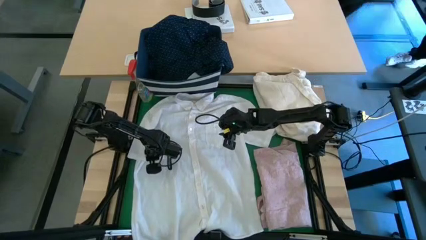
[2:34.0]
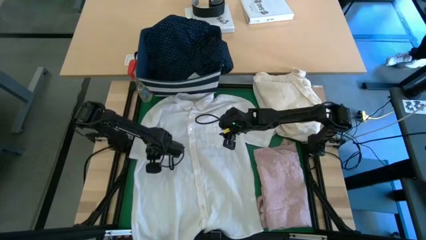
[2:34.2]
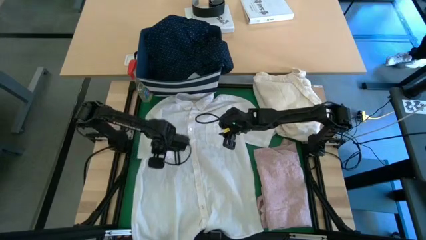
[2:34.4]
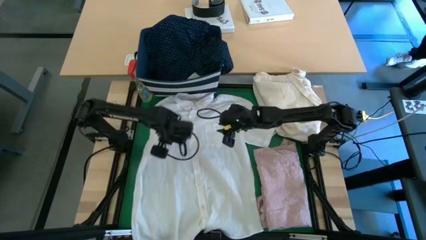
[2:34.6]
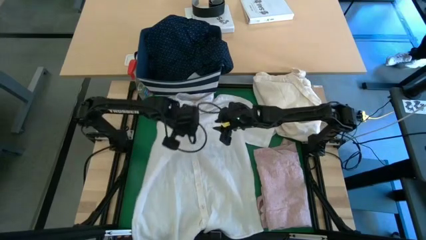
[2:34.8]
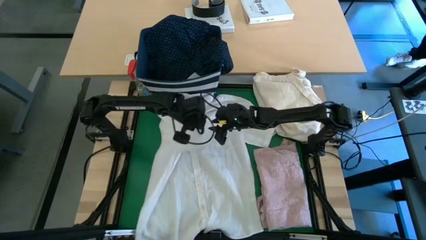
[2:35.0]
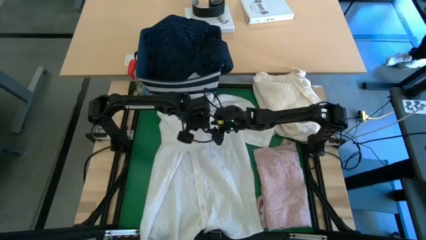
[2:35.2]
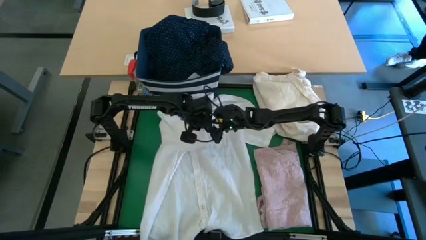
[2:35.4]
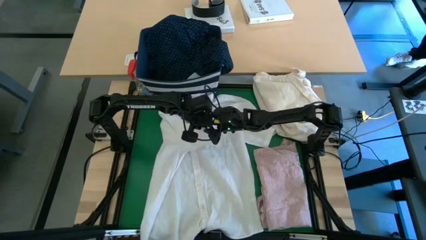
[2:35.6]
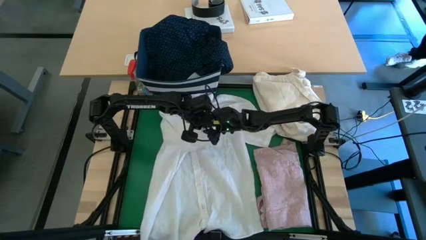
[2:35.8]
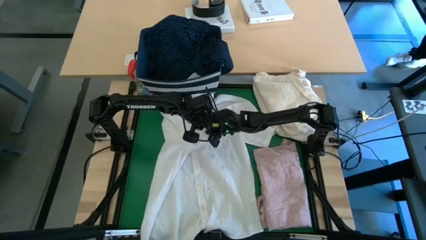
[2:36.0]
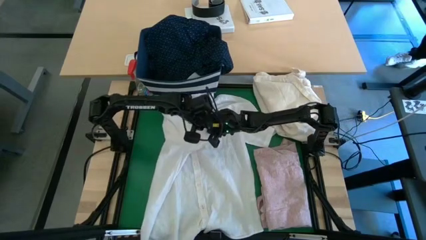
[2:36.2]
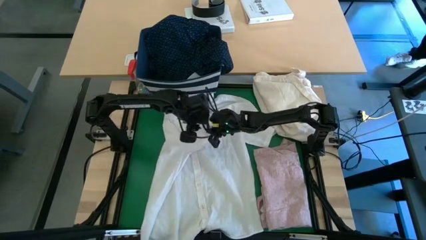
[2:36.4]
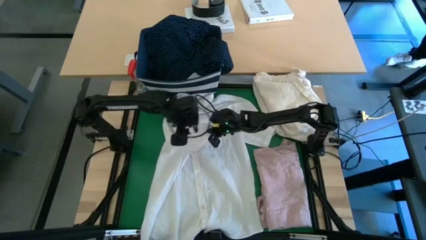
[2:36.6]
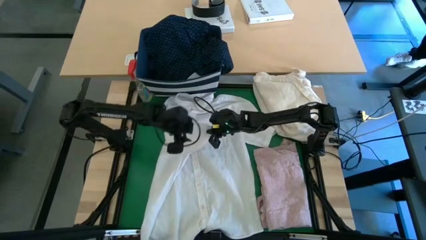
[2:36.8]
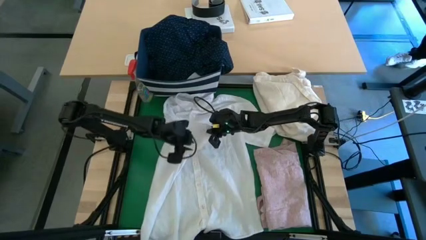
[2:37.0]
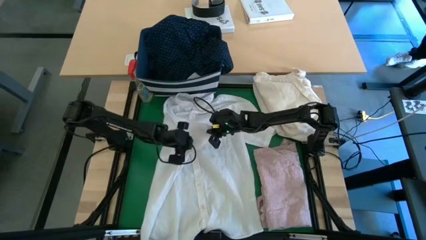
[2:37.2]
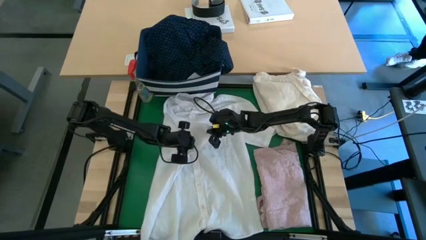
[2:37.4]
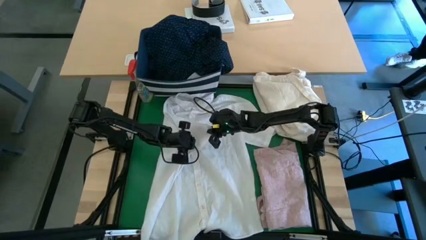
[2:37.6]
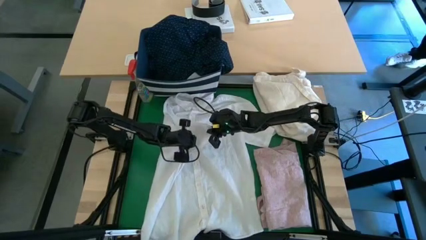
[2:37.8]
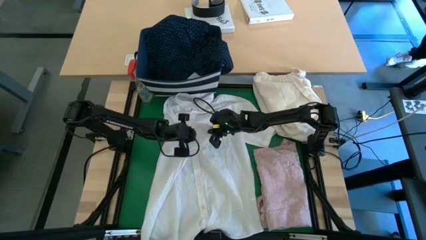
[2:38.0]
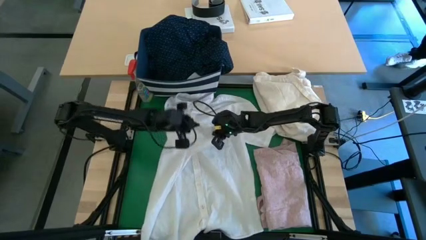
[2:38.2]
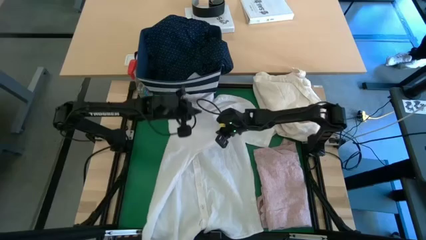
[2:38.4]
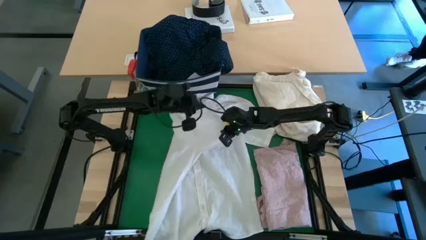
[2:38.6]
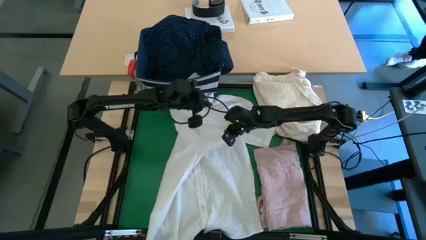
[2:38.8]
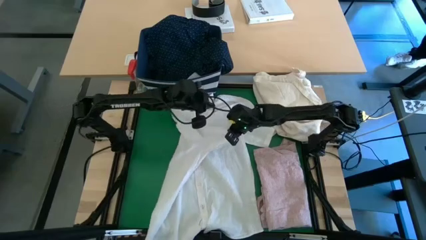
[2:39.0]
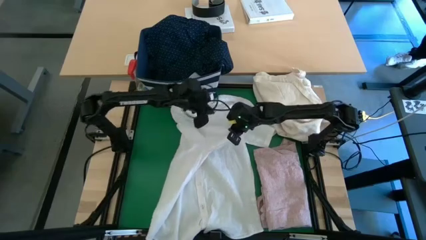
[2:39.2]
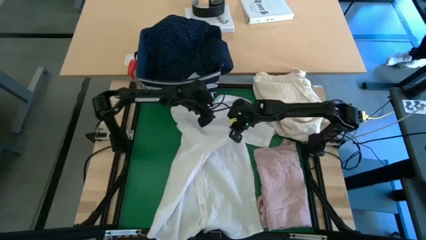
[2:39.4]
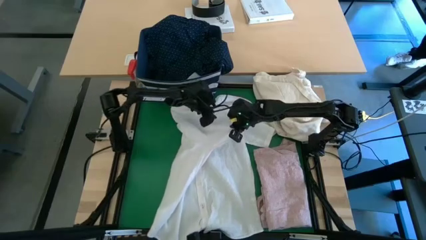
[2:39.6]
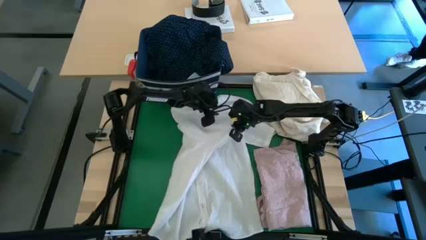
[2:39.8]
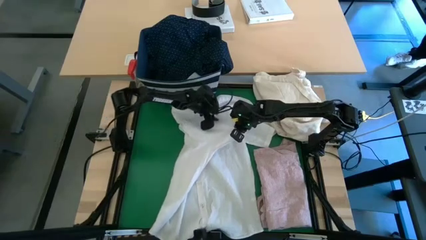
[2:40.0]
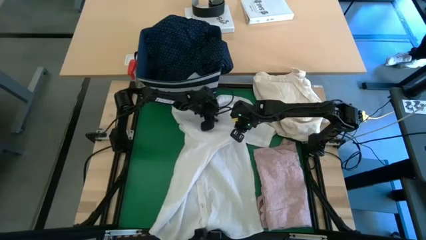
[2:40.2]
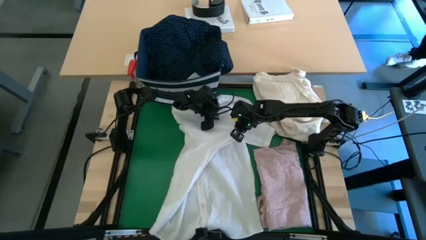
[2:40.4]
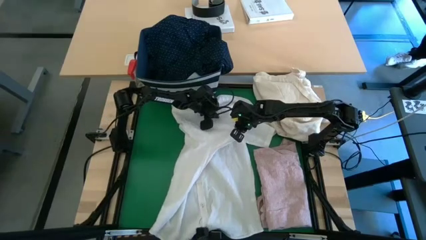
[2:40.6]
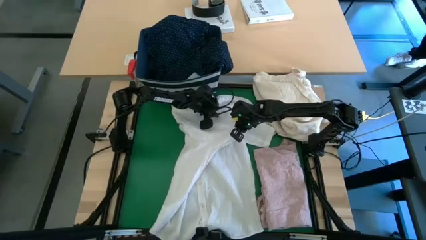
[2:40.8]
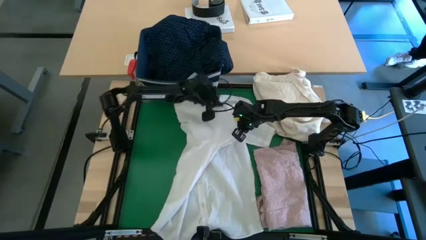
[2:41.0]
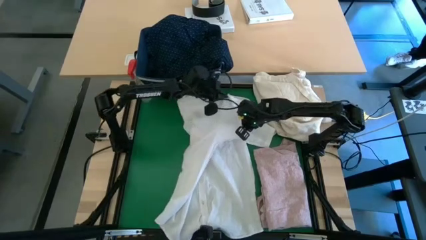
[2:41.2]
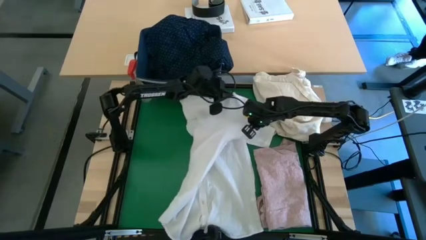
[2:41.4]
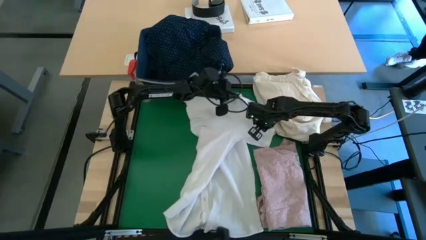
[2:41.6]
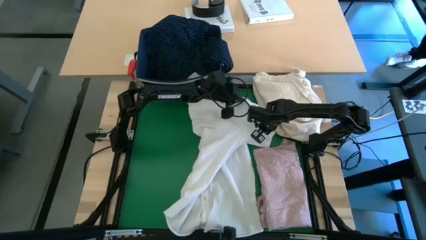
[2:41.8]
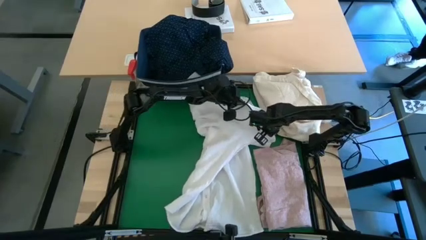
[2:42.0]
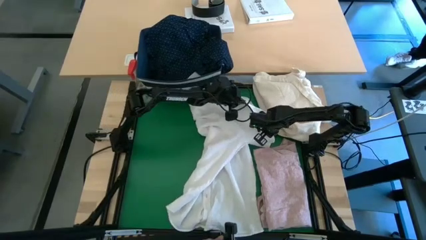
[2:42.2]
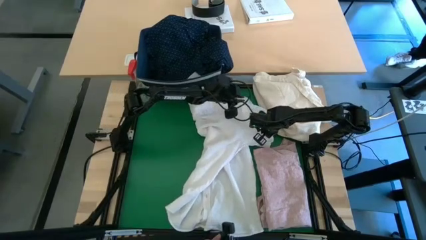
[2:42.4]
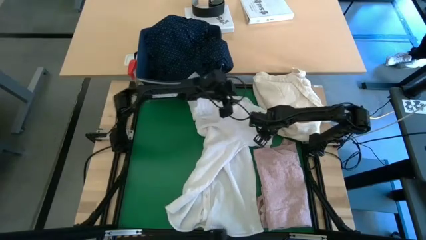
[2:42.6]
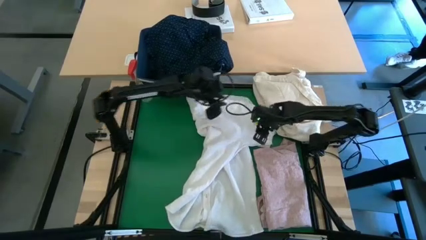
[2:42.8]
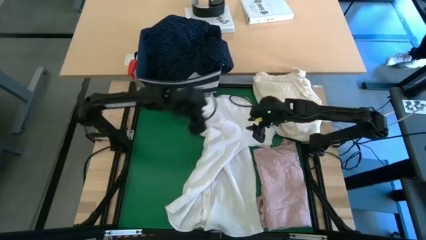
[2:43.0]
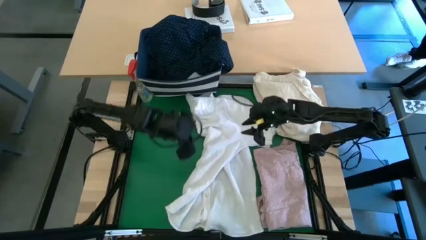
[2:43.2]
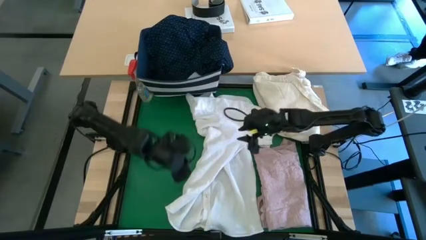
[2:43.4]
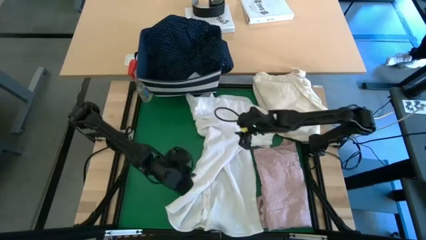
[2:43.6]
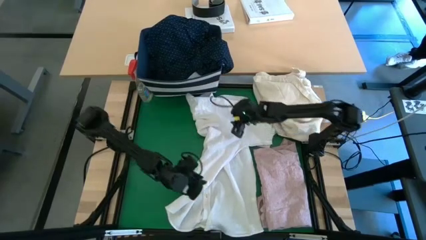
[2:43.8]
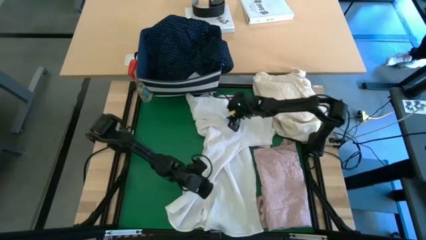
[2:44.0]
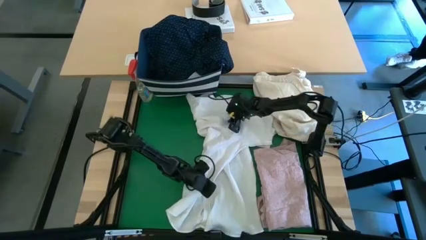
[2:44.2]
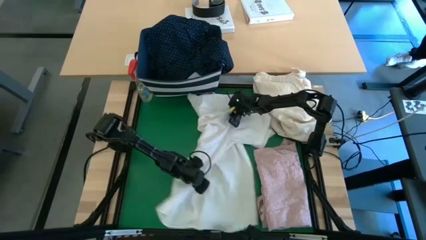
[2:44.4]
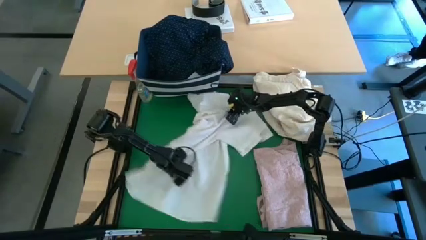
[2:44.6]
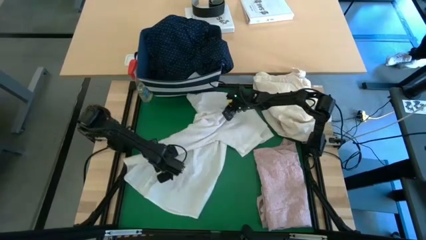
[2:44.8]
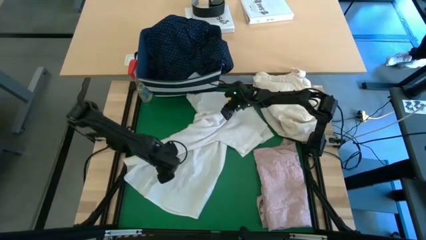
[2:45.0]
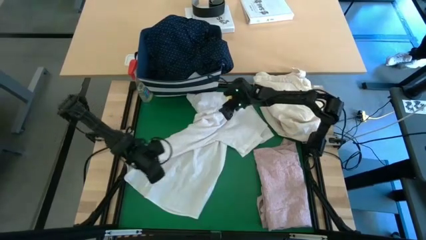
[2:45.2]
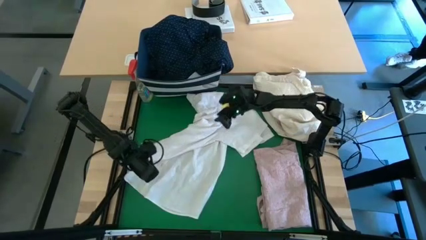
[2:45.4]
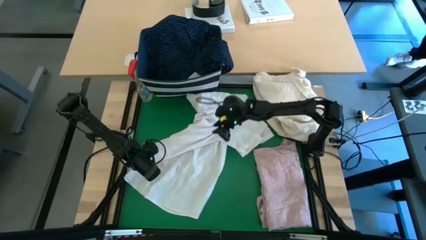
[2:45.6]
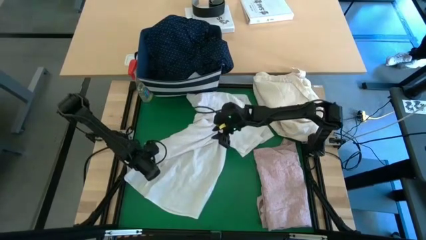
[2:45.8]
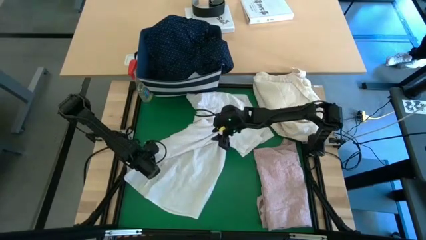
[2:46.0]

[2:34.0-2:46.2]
Task: Fold laundry
Fold the white polo shirt

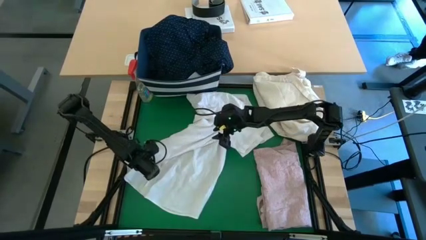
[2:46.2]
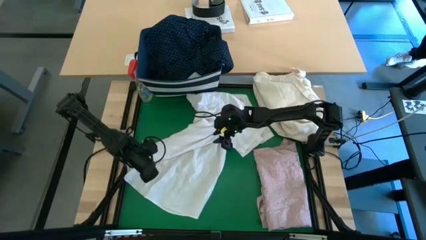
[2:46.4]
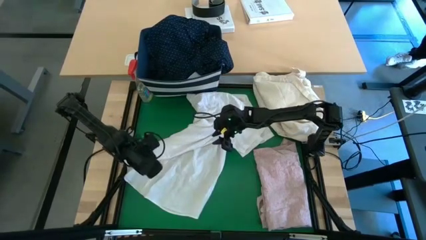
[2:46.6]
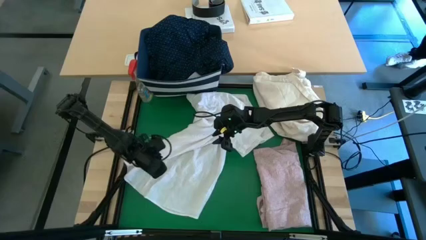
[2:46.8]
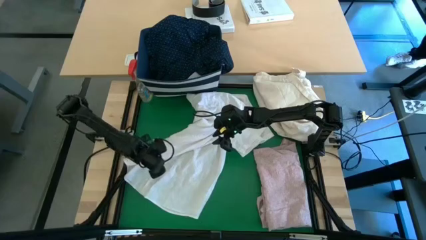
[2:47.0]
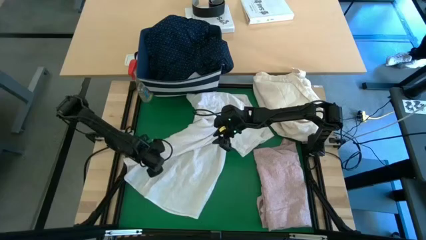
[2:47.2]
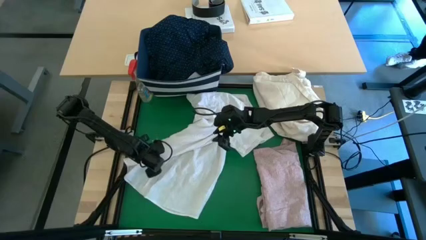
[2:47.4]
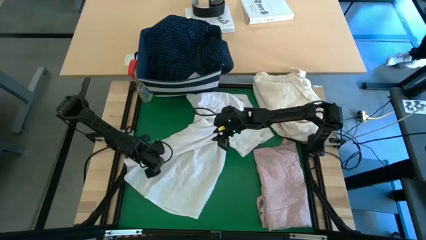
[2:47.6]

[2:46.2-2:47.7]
Fold the white polo shirt

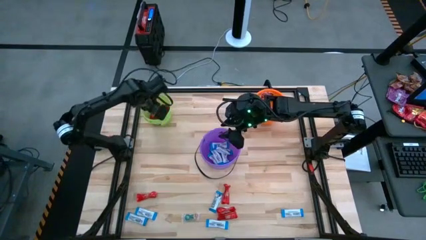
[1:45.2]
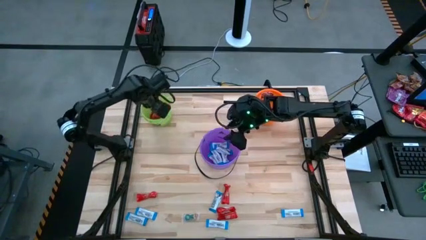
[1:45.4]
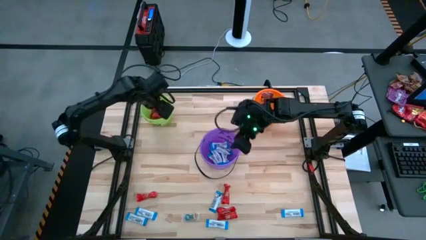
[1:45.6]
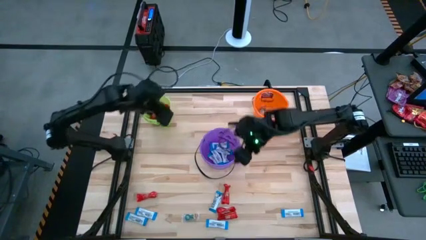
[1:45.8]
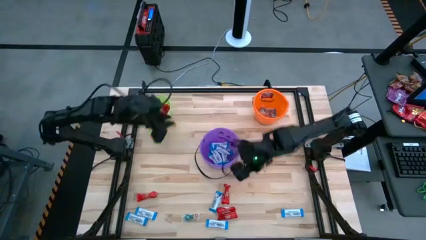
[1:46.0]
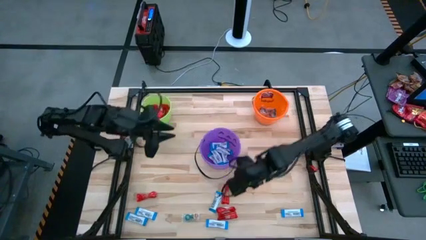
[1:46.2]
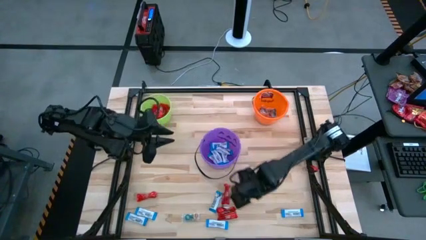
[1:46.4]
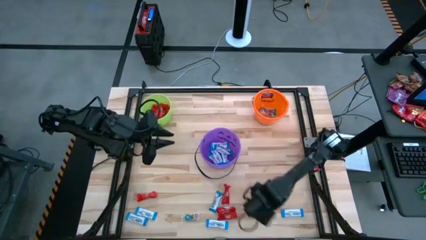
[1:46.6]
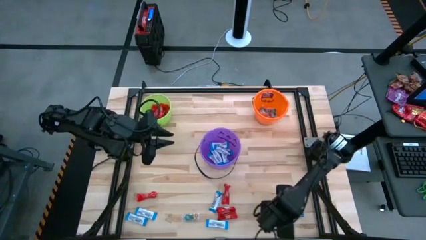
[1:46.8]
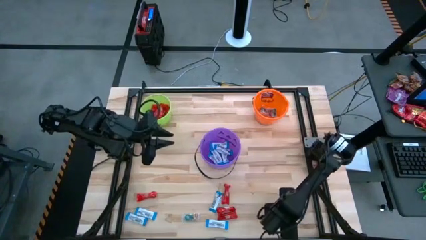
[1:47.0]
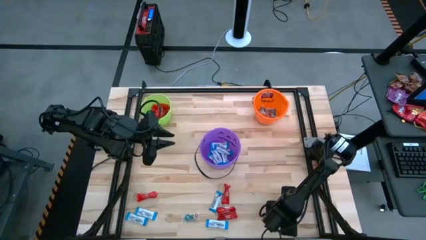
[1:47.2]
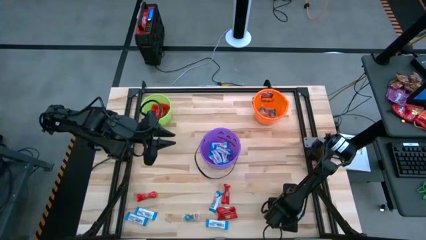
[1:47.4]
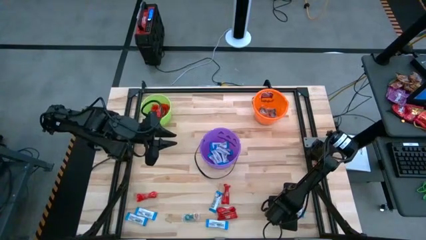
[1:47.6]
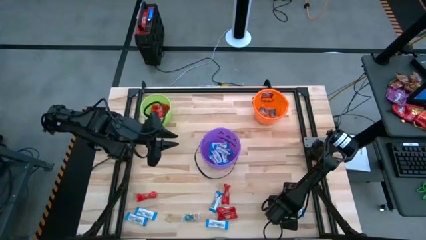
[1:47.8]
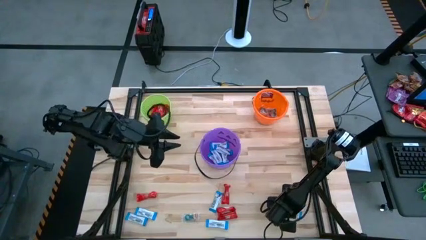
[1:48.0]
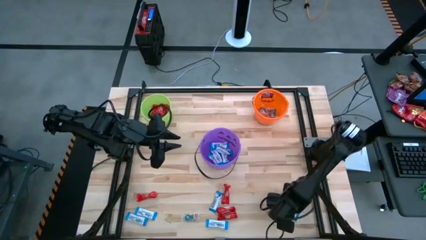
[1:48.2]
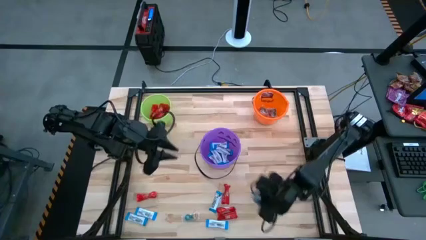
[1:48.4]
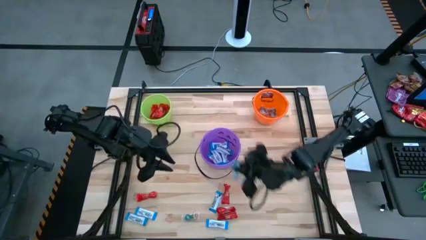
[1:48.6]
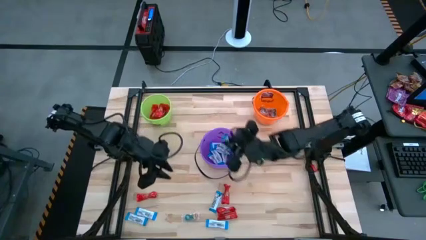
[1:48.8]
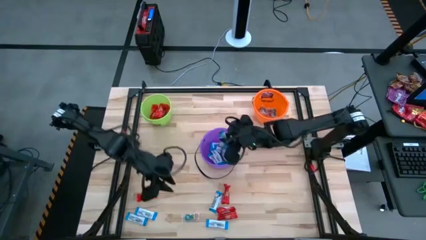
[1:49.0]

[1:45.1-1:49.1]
Task: Sort candy by brand, put in halloween buckets
Put the white chocolate into the purple bucket
